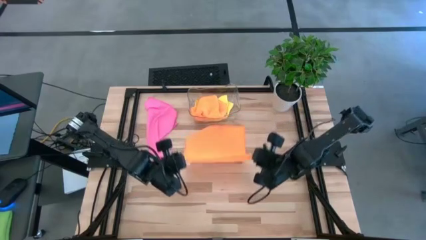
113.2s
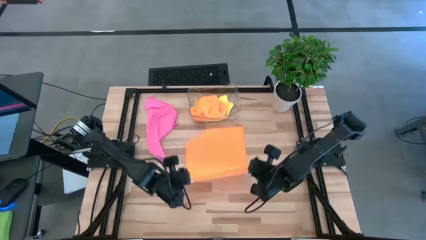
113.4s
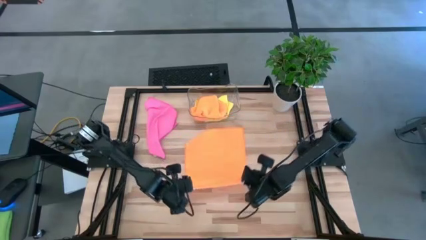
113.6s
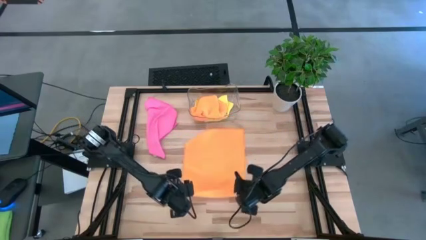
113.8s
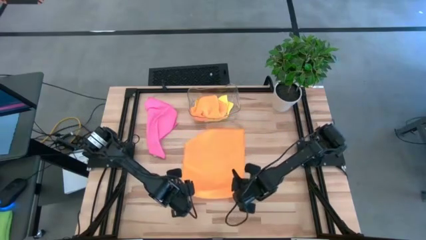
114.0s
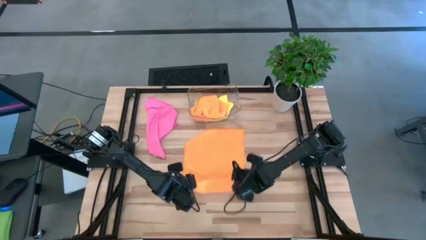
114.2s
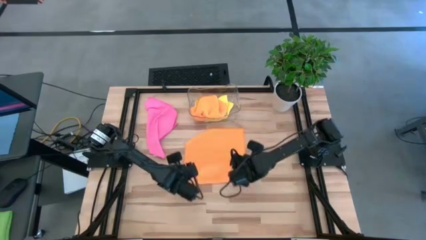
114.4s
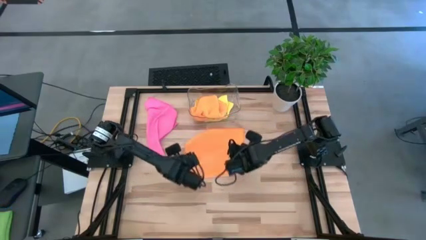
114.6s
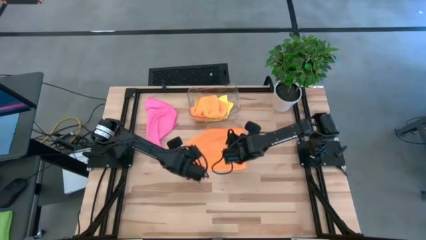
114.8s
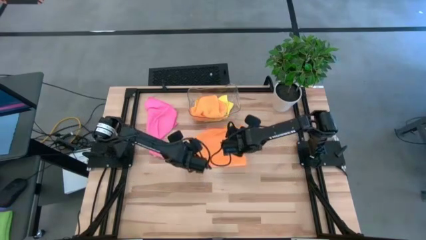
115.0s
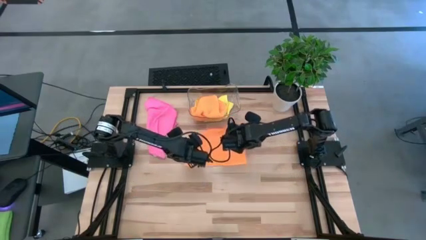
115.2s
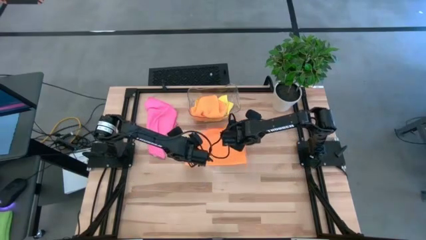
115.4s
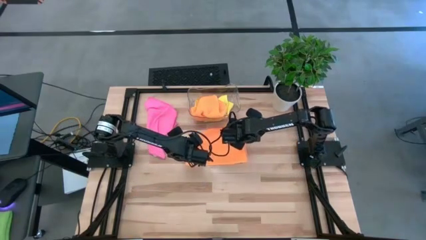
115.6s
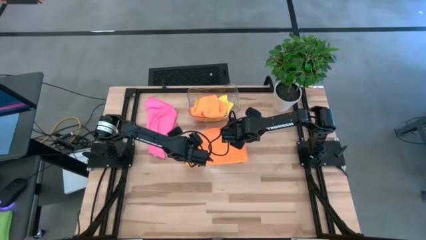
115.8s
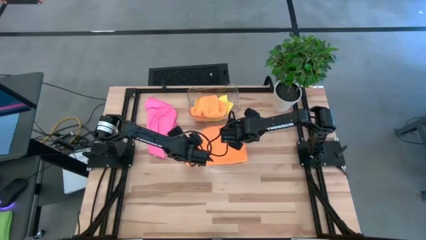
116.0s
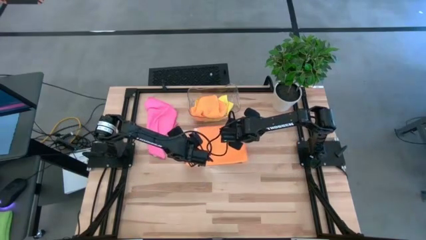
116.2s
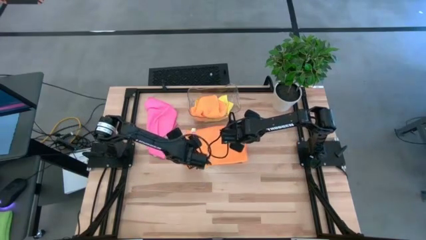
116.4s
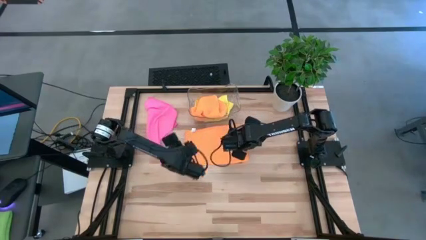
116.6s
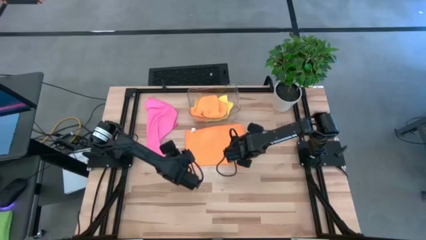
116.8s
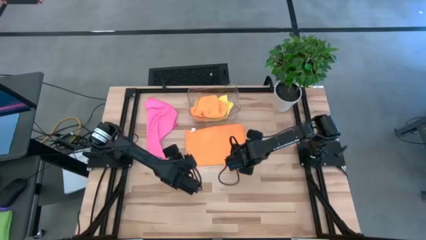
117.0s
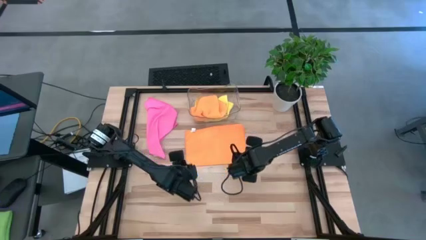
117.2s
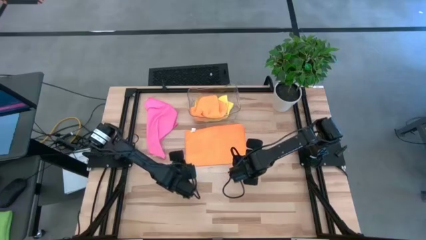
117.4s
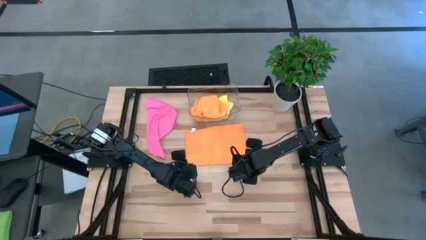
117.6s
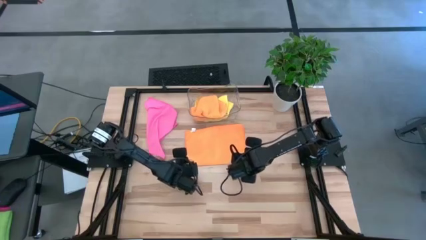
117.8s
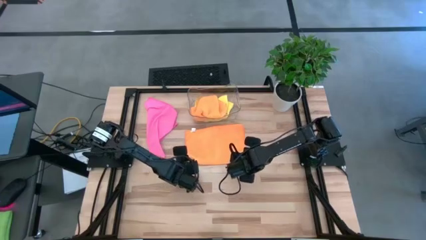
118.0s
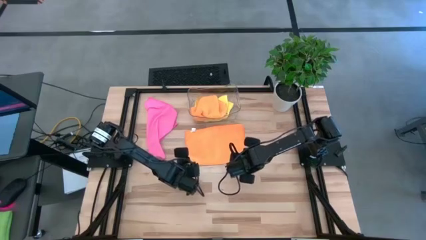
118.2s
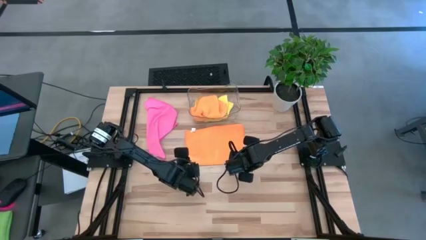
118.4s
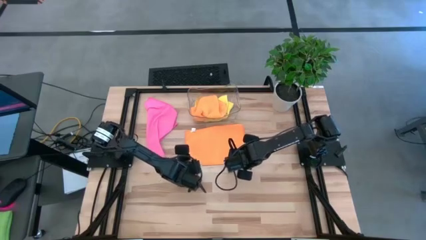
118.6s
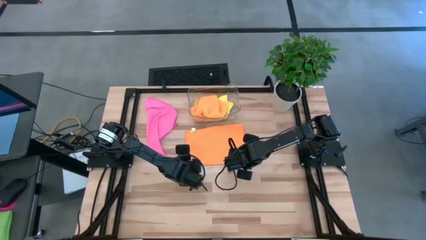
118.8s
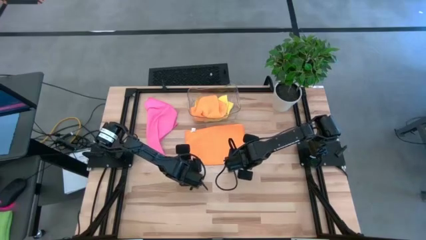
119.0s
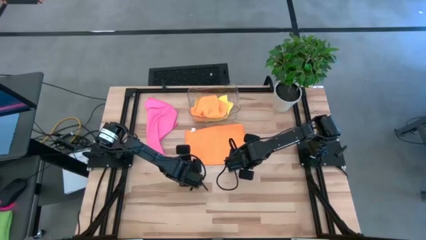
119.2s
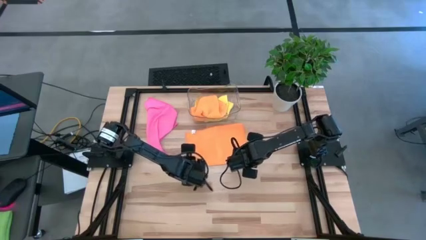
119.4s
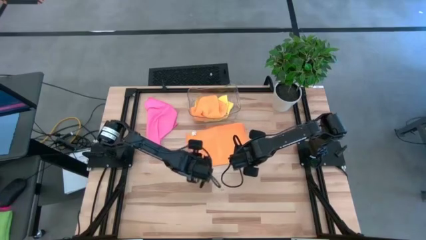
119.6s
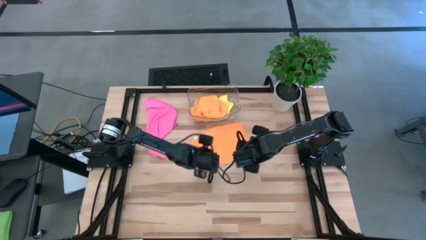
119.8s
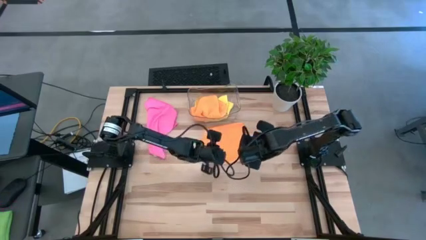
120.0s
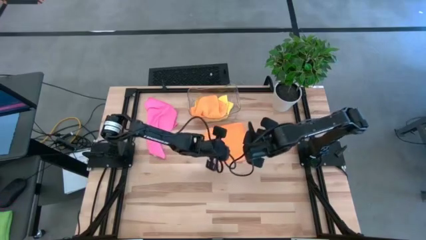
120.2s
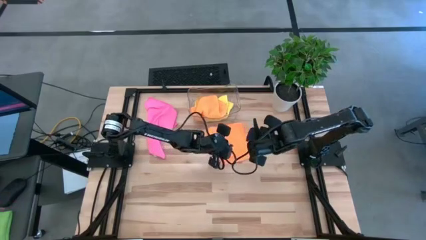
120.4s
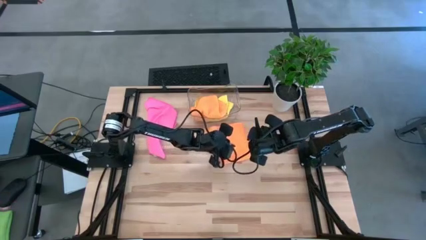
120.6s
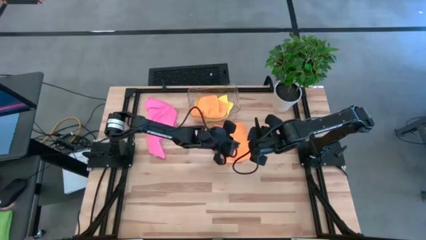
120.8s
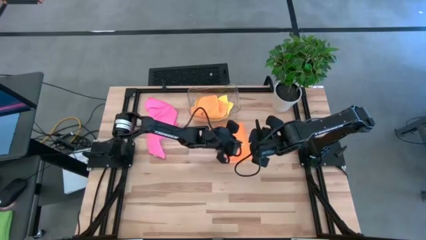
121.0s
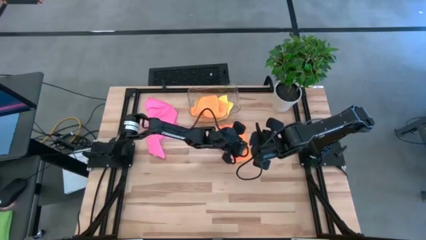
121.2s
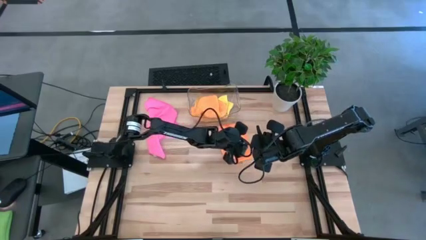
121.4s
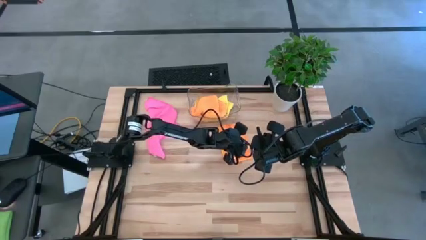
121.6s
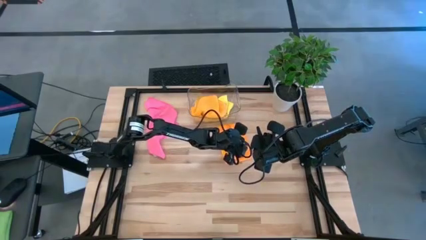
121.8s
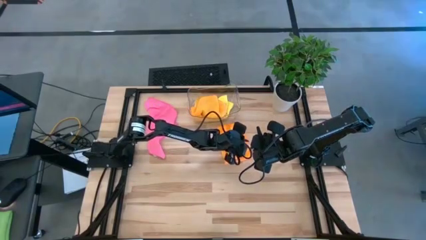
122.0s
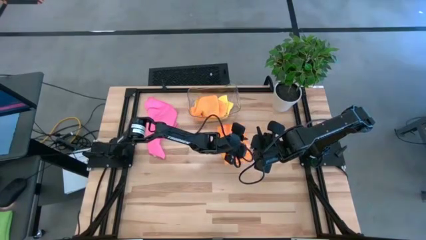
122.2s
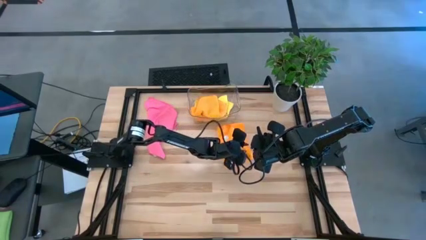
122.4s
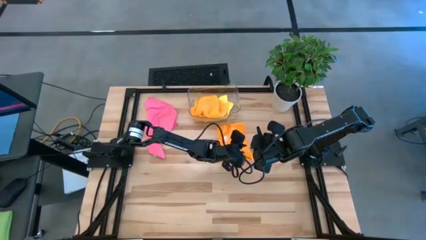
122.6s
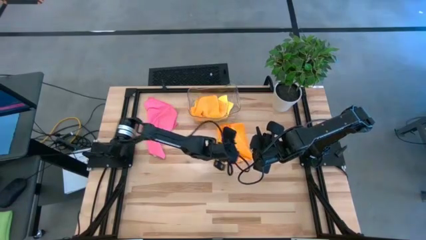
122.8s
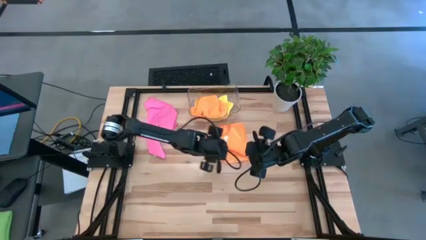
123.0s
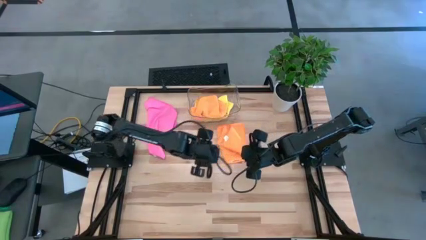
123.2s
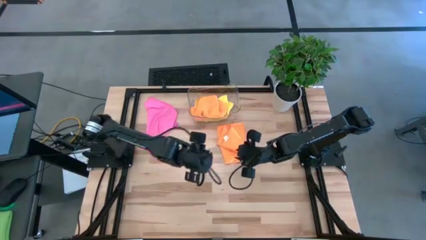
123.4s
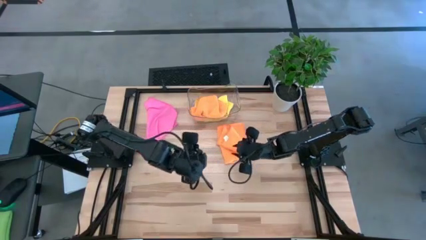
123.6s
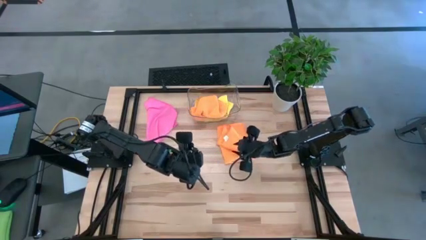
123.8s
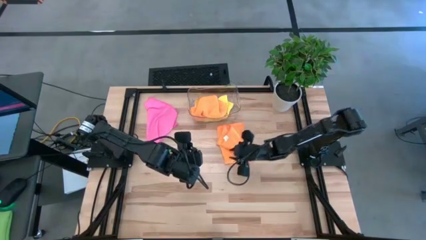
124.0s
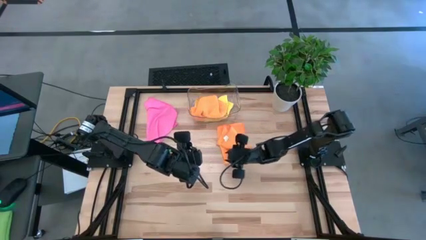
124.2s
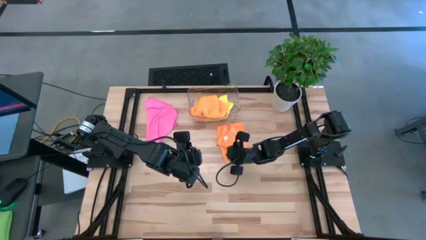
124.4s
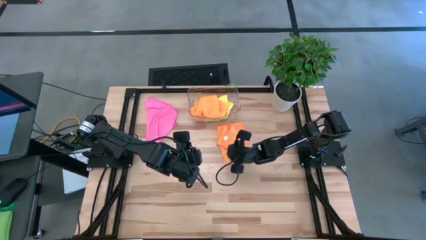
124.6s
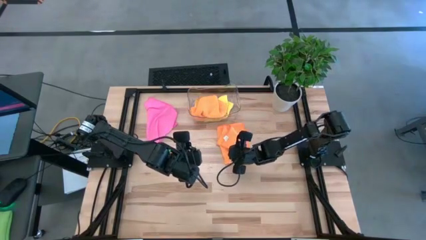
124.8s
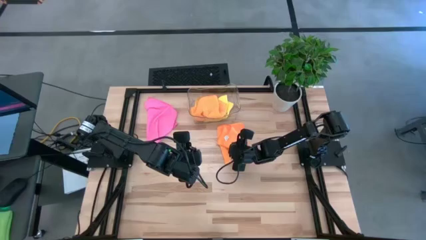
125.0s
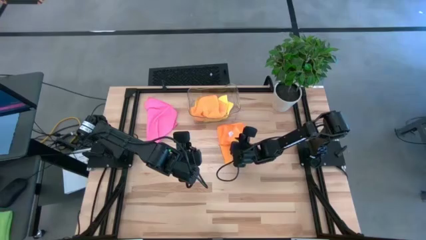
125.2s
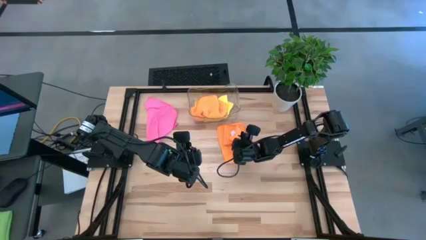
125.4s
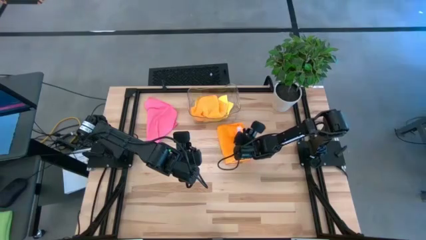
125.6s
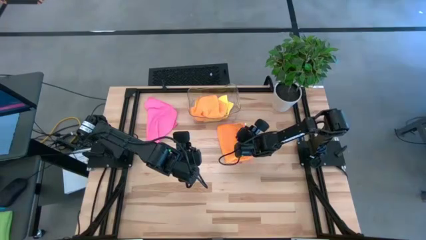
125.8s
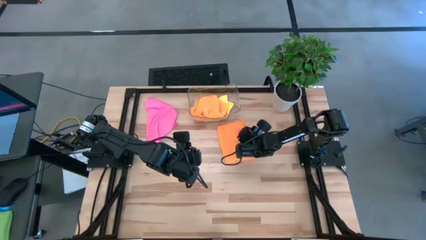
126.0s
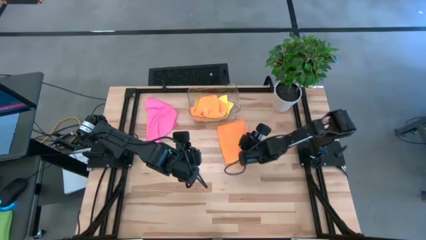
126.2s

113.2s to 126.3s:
Task: Fold microfiber towels
Fold the orange towel

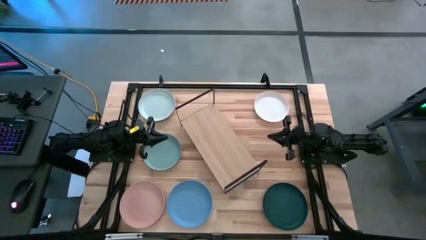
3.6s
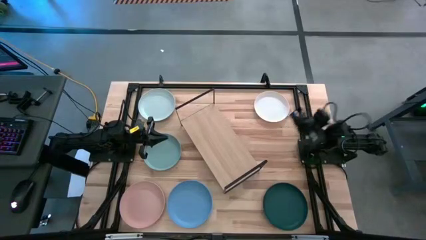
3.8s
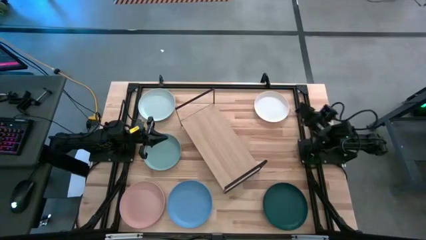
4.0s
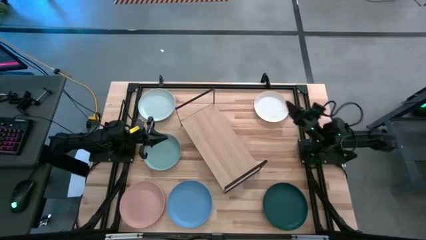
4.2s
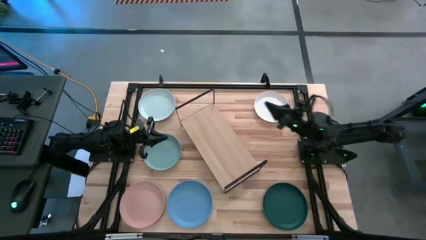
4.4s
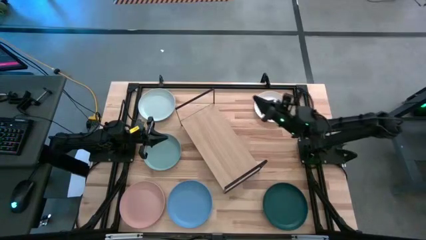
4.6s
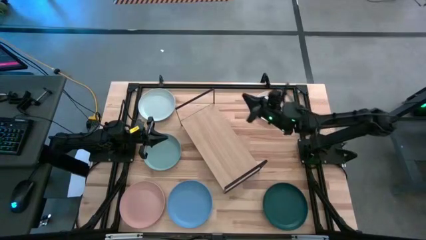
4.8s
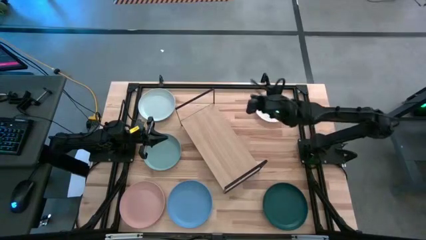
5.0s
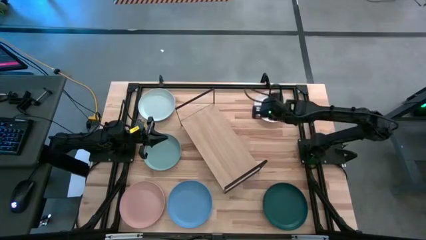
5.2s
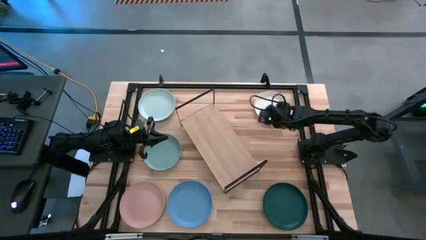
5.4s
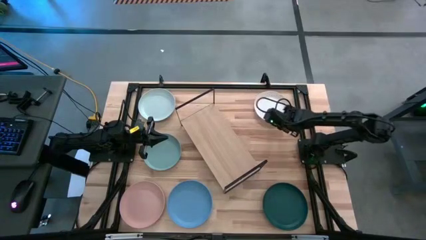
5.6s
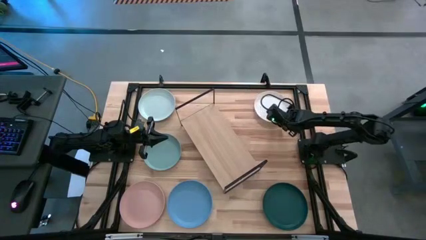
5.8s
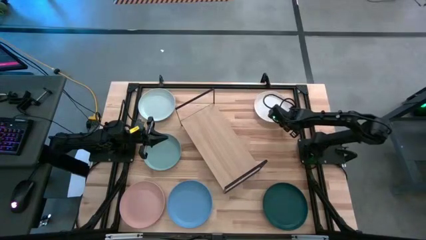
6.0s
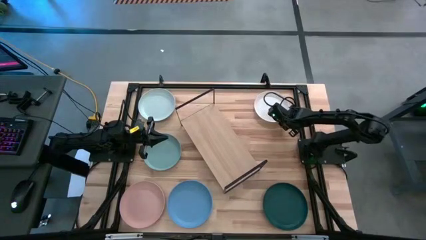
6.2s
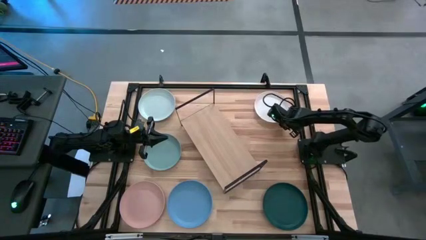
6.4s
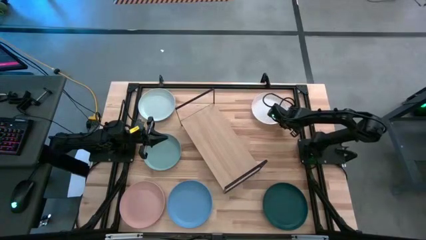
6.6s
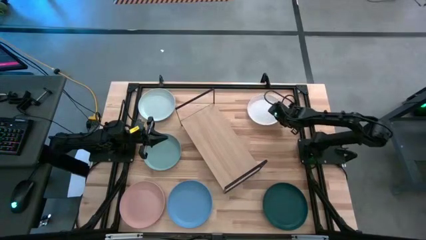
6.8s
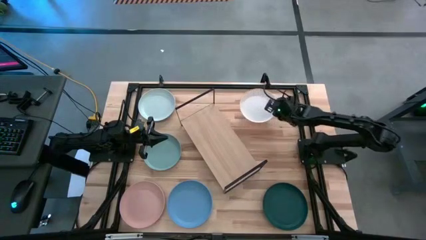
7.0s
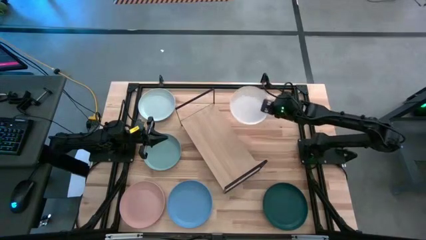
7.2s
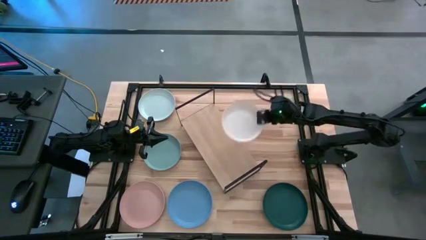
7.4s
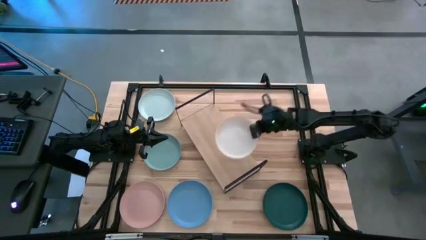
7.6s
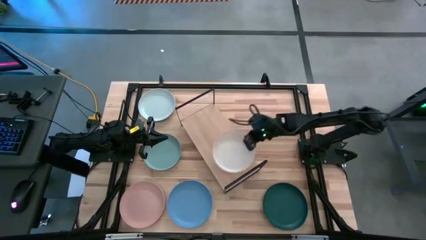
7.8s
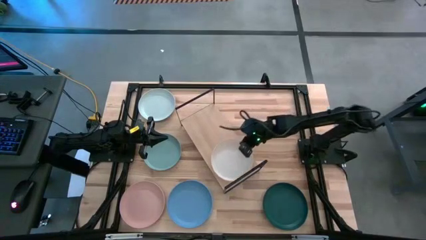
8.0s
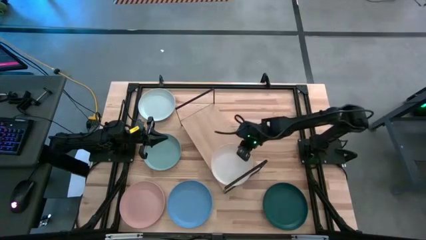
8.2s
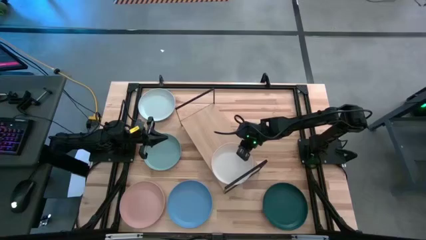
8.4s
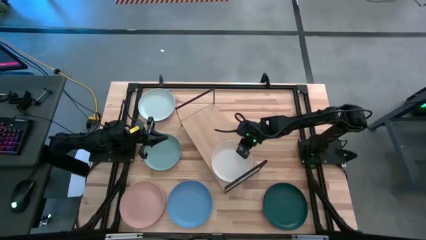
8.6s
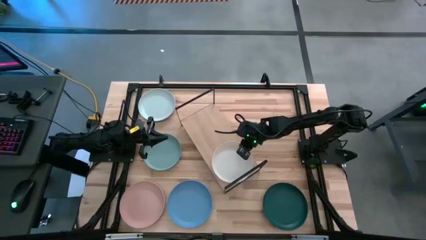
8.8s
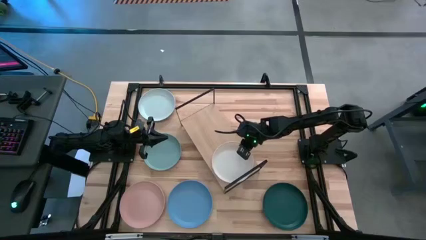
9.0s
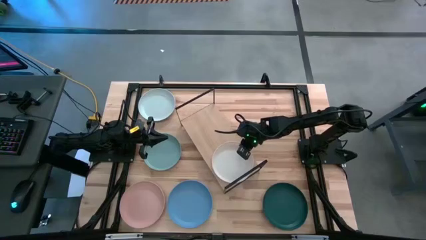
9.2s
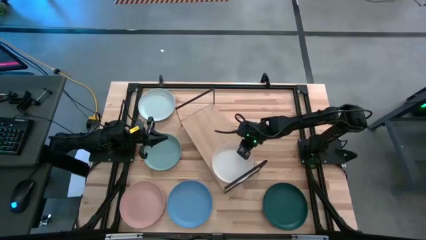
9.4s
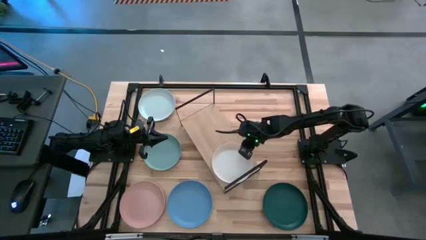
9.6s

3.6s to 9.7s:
Task: Place and stack plates onto a shelf
Put the white plate on the shelf
